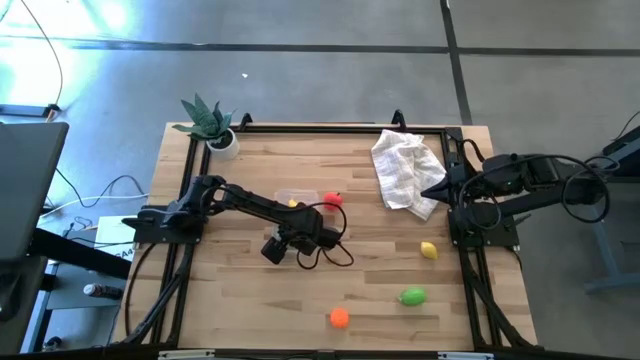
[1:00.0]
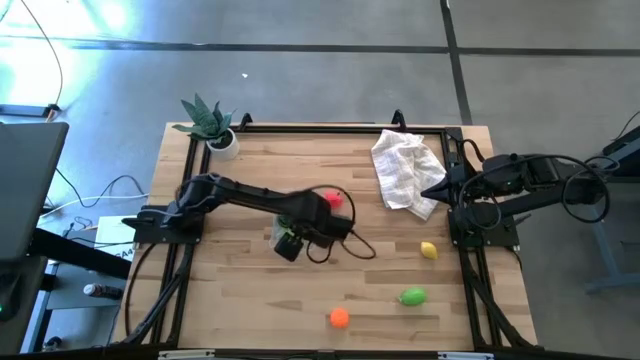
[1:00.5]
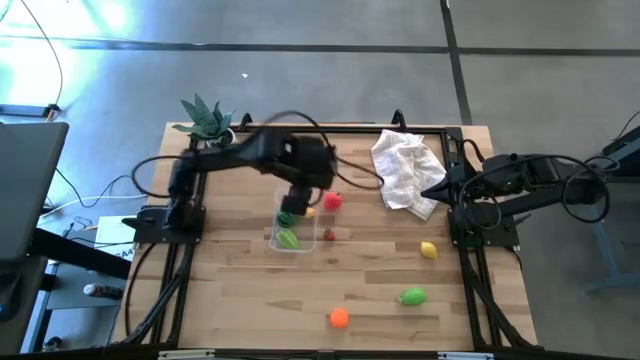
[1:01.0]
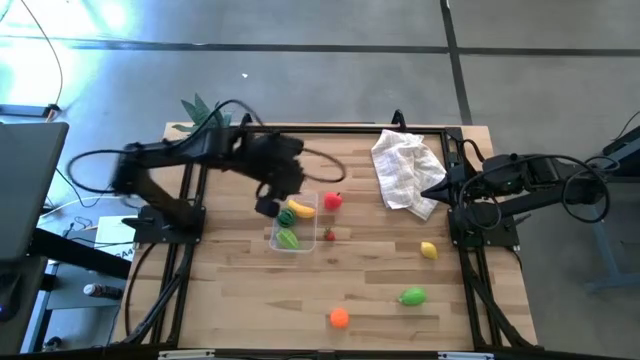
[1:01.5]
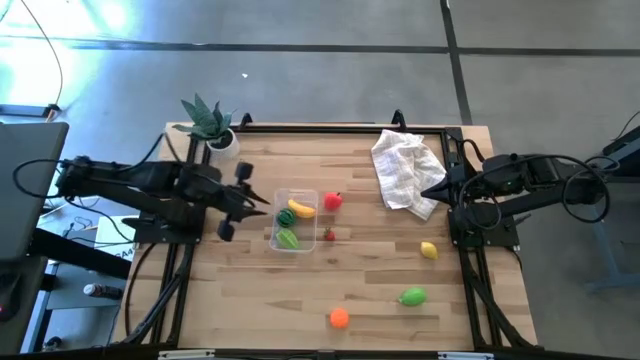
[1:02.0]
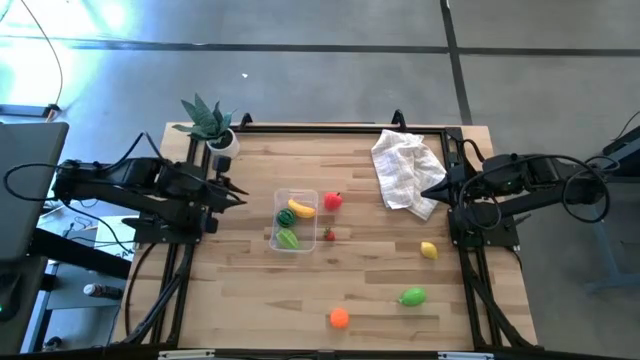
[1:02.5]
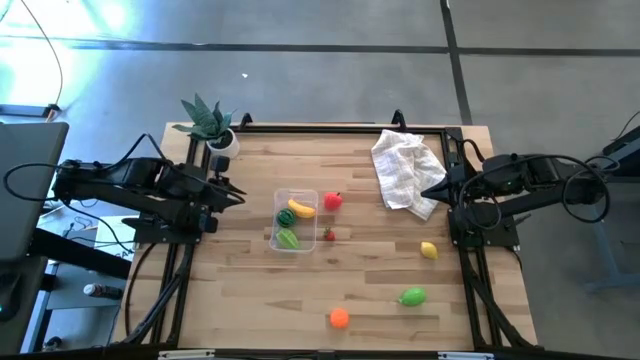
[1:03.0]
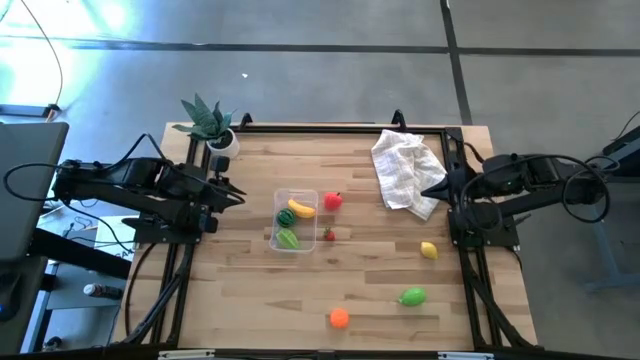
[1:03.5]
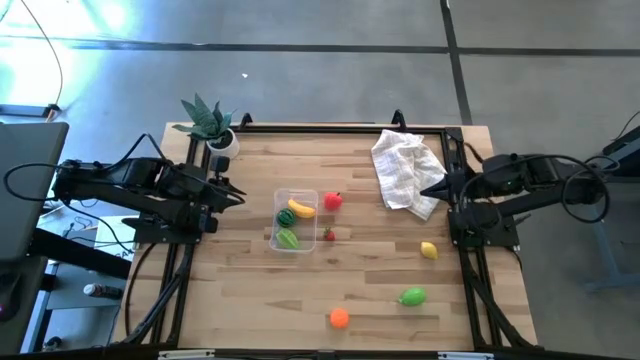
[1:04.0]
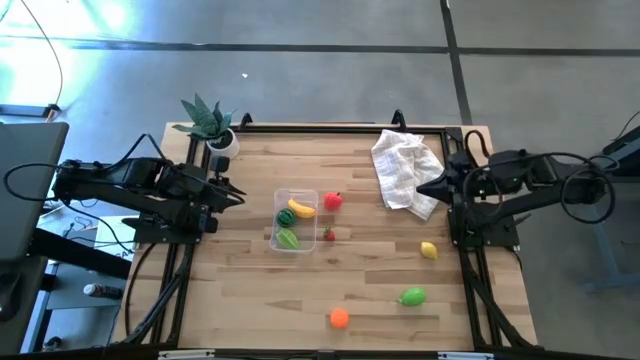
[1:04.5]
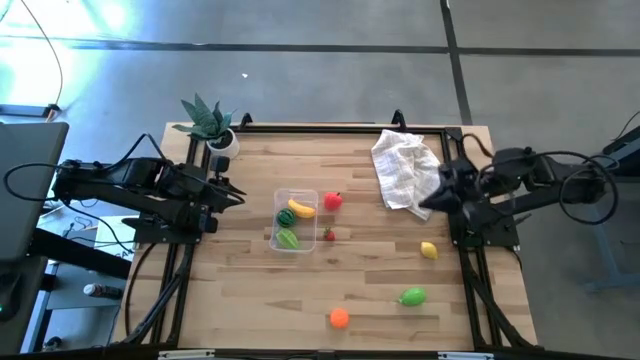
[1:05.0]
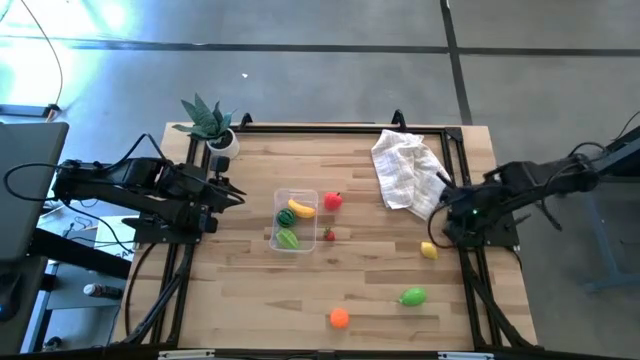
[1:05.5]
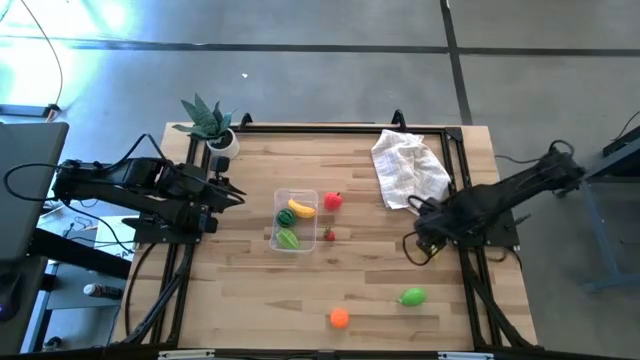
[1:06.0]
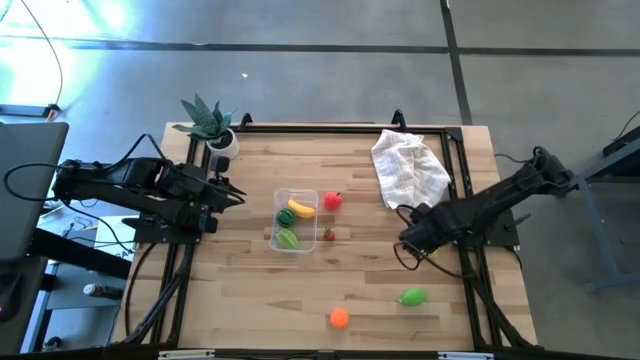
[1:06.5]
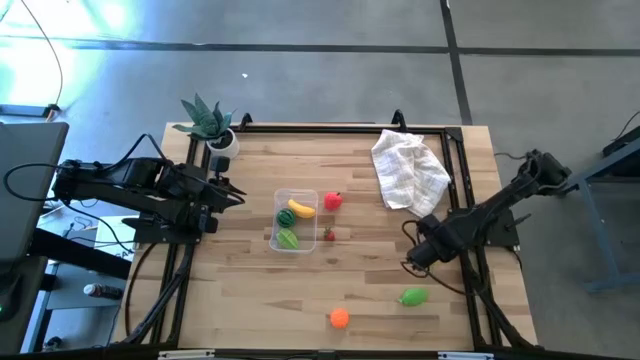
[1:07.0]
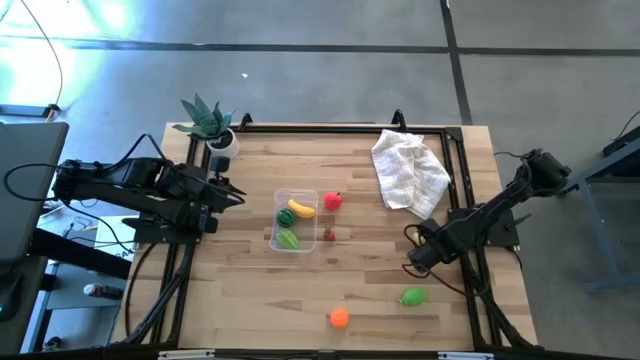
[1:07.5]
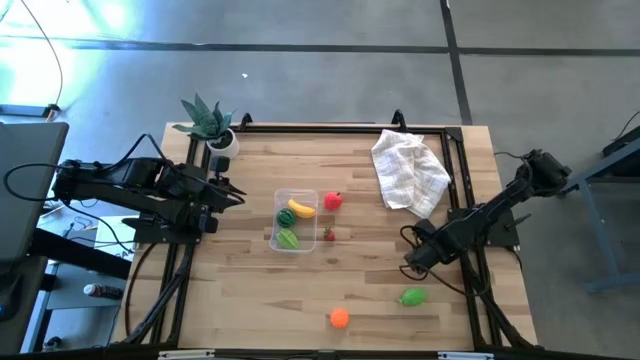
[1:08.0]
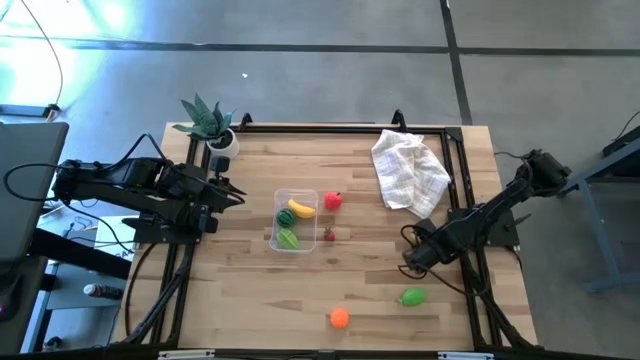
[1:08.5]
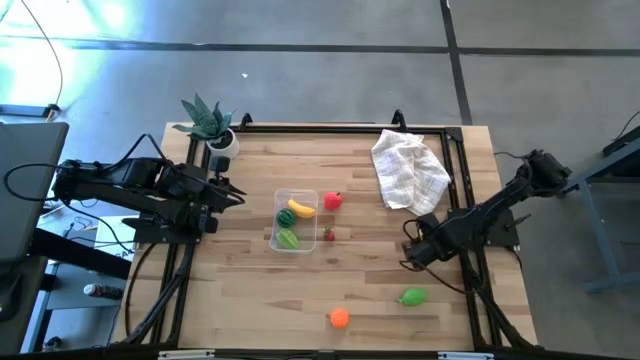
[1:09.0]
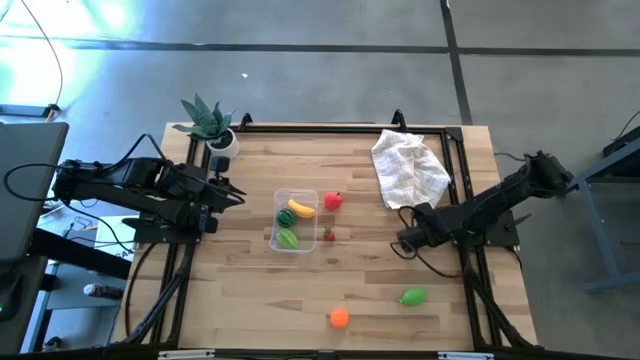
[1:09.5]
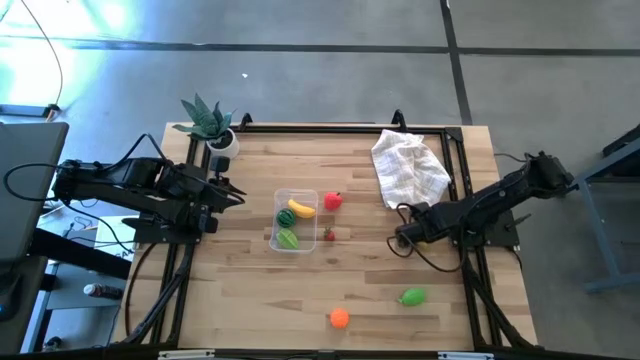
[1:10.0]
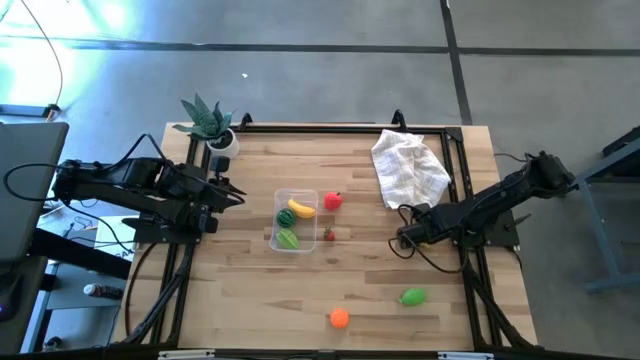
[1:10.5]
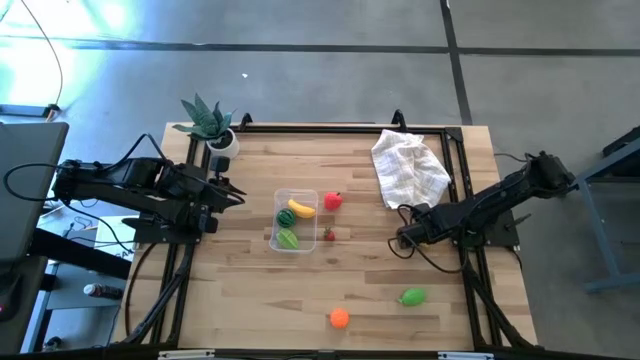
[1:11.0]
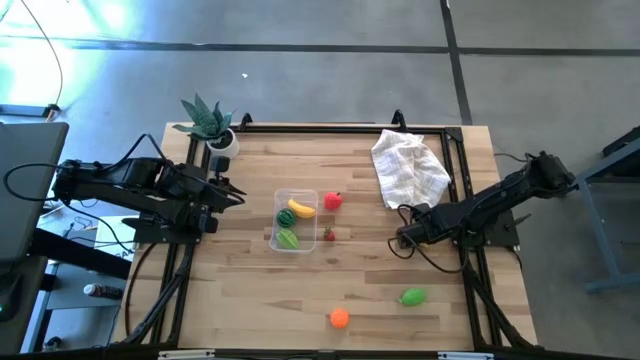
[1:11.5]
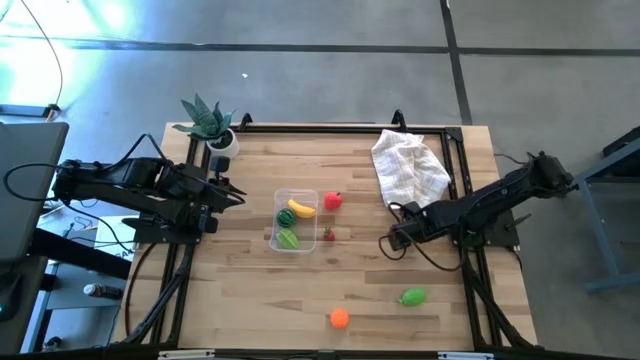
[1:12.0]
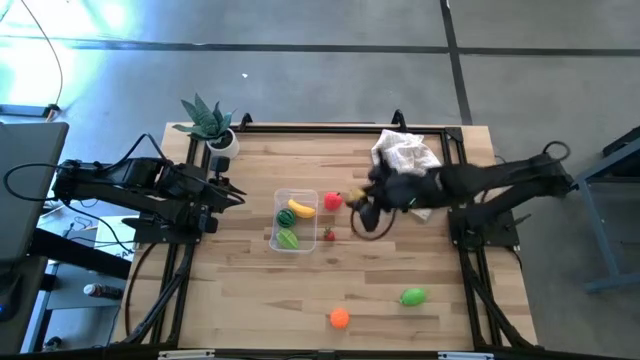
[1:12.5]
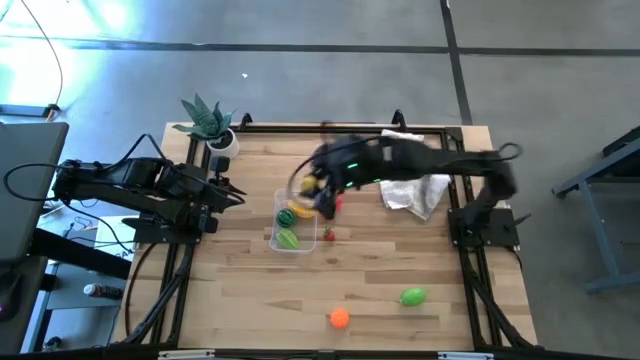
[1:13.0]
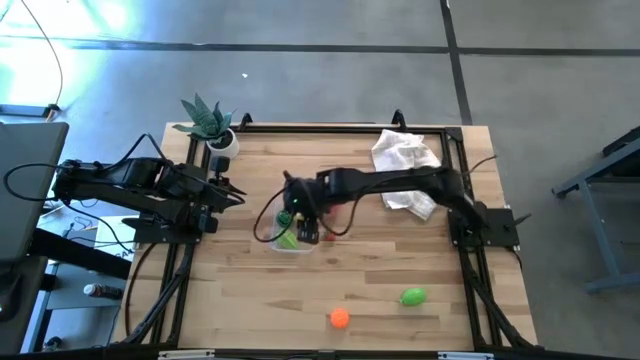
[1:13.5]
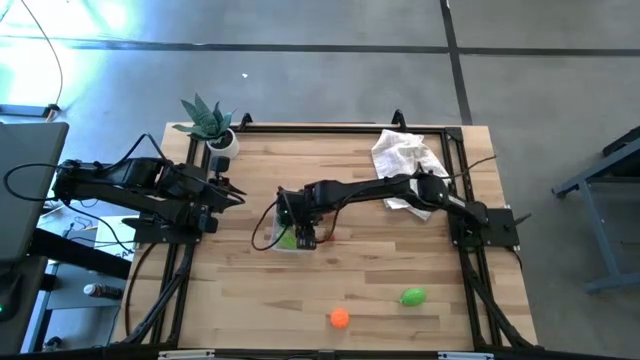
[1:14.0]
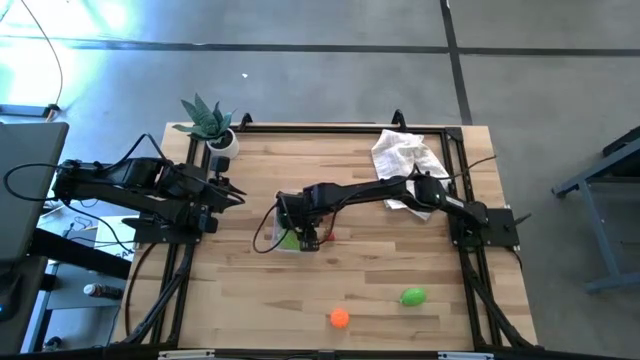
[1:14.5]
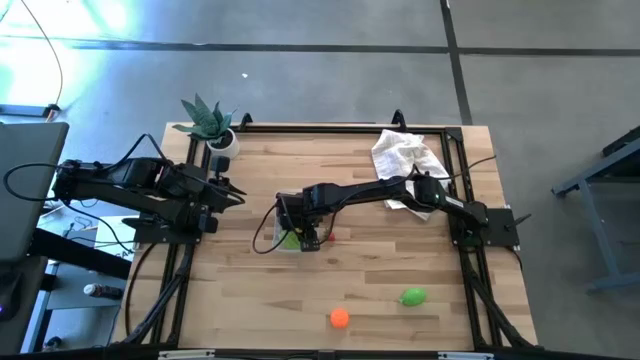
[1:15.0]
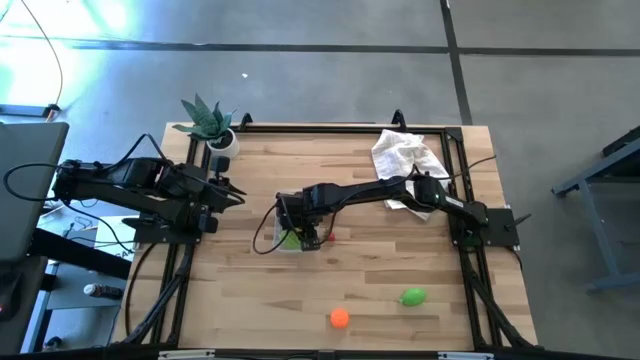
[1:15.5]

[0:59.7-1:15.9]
Task: Pick and placing Produce into tupperware
Put the lemon into the bin

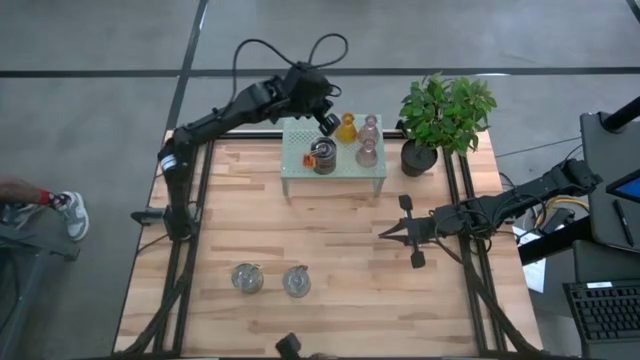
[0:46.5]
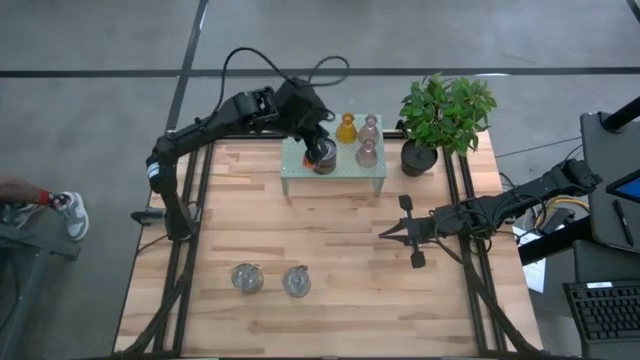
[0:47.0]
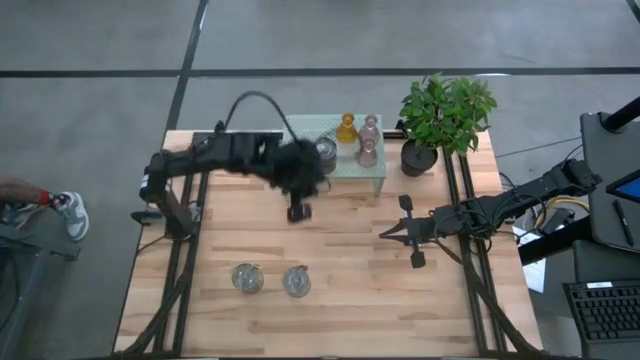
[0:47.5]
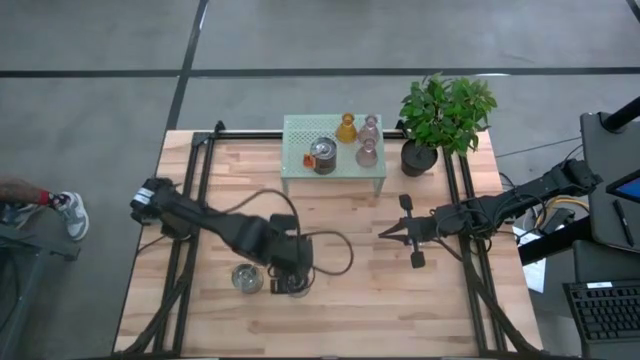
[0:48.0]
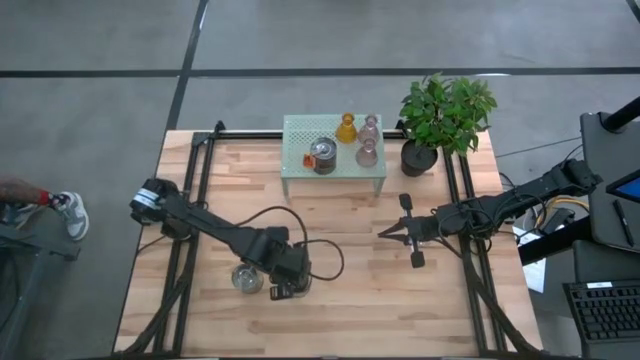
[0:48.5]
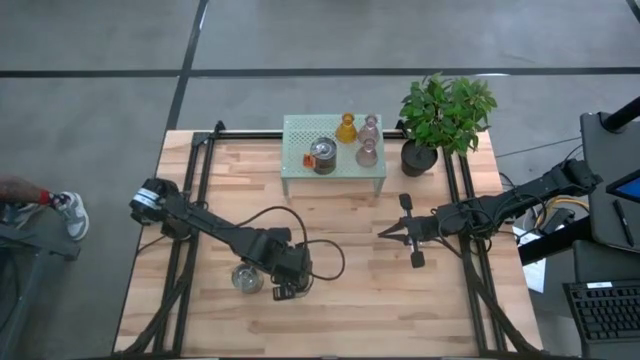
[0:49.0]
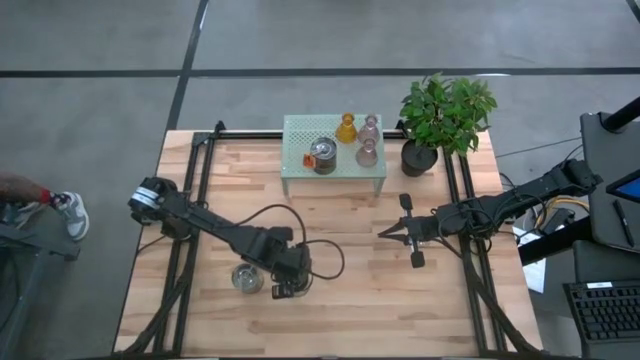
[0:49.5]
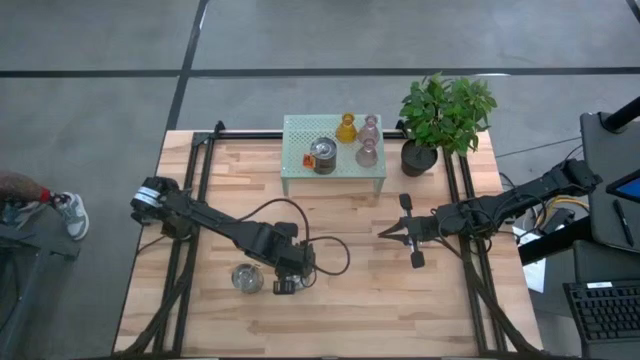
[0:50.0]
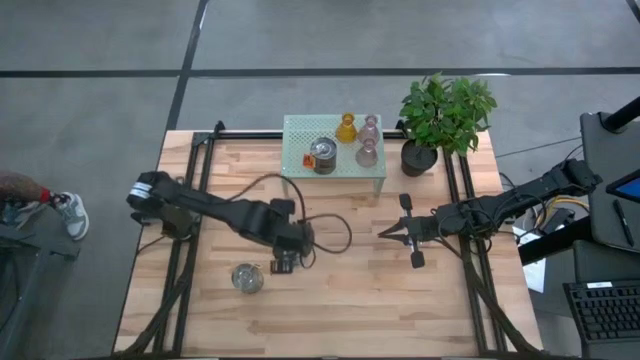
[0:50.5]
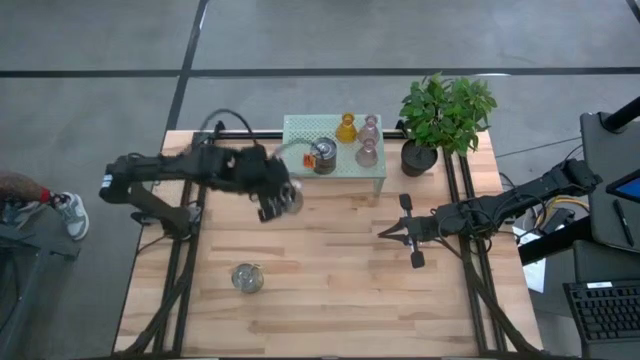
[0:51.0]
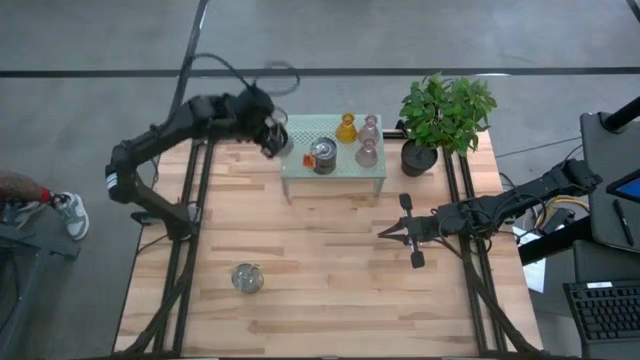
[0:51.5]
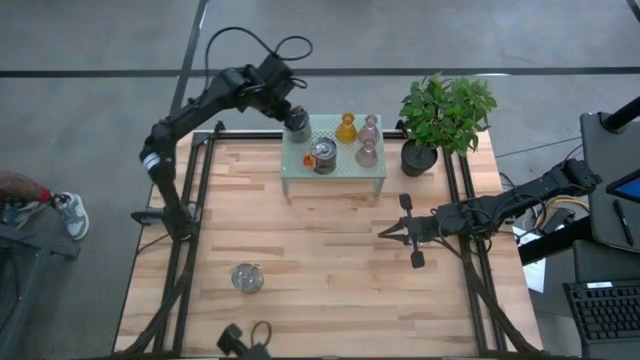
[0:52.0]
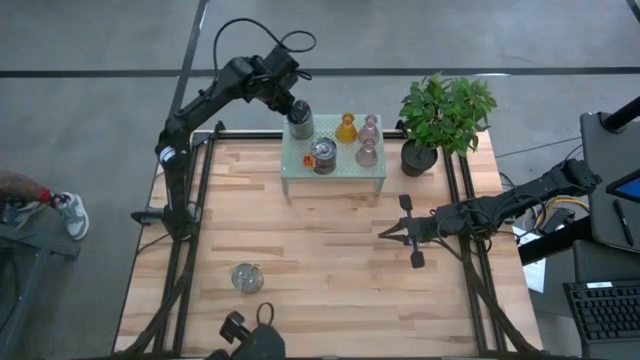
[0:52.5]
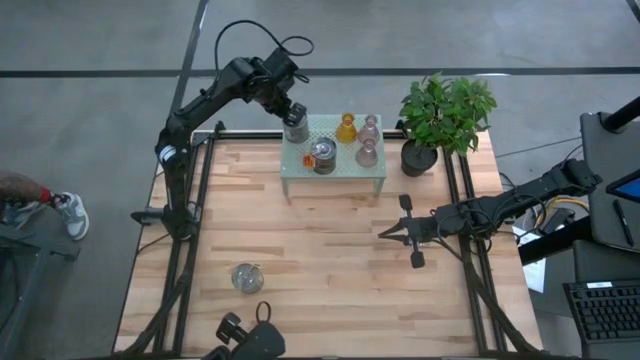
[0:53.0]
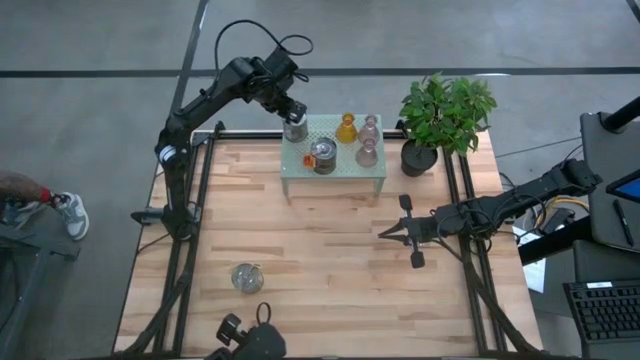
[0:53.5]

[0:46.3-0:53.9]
Task: Pick & Place candle stick holders
Put the right scented candle can on the shelf
